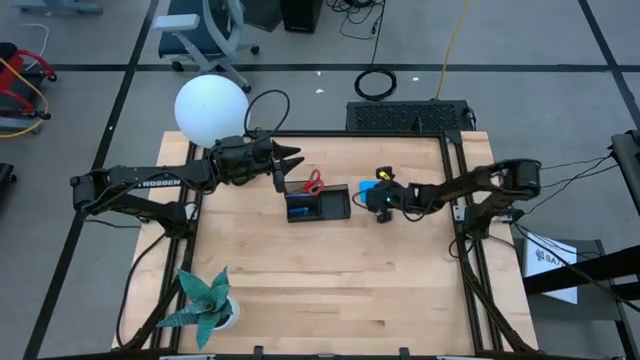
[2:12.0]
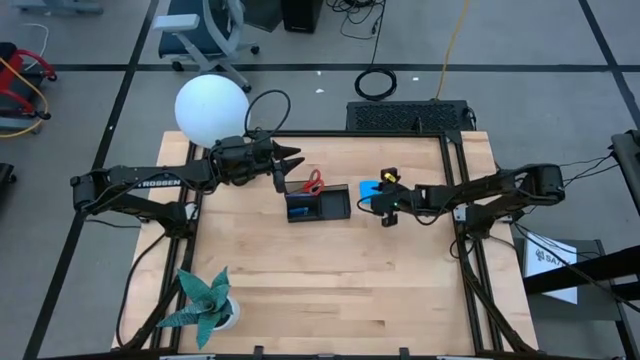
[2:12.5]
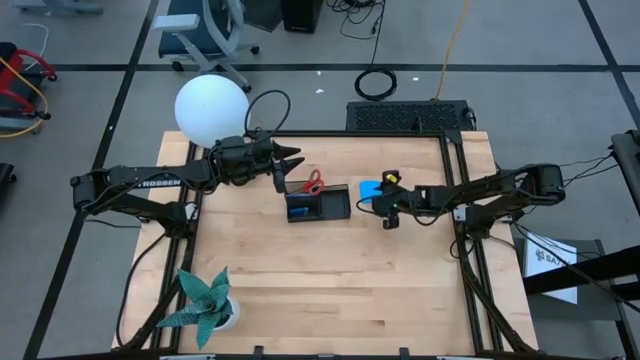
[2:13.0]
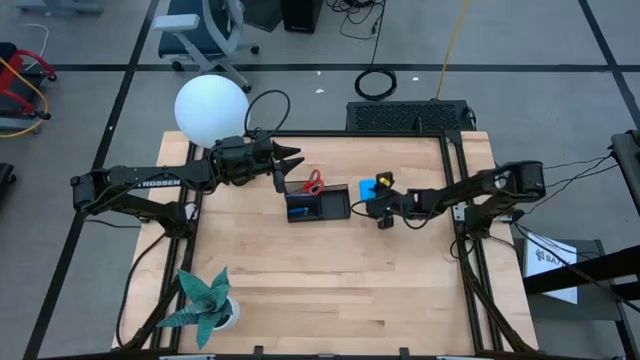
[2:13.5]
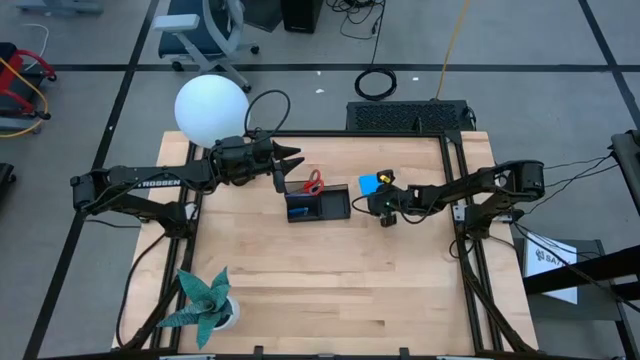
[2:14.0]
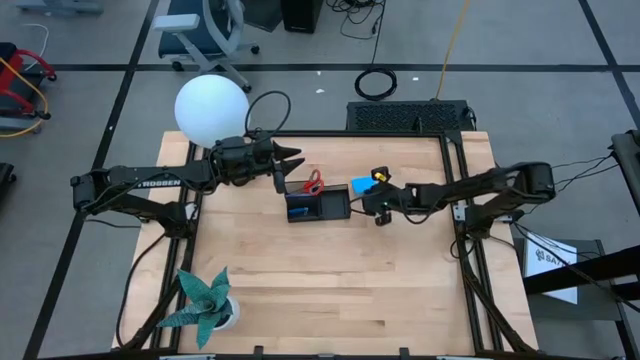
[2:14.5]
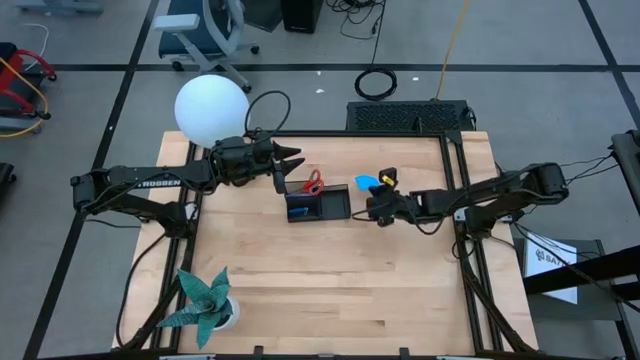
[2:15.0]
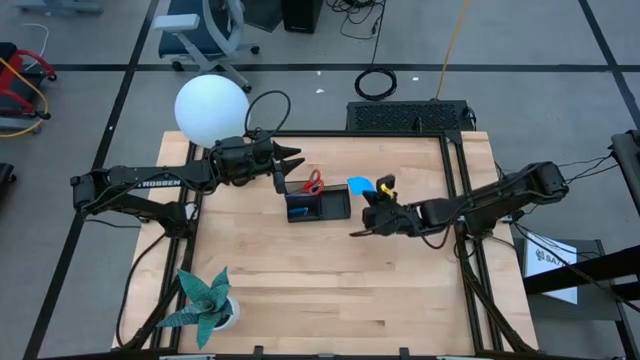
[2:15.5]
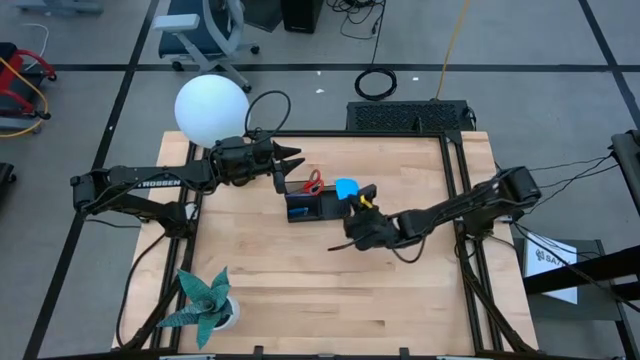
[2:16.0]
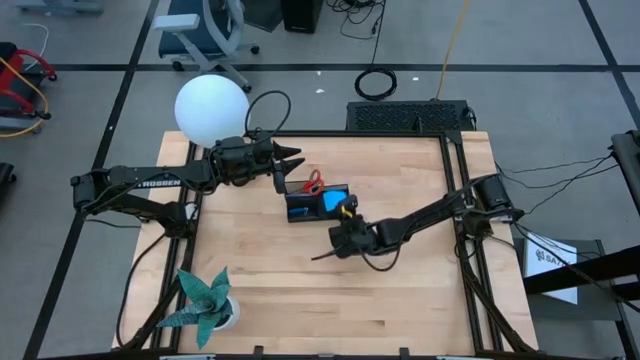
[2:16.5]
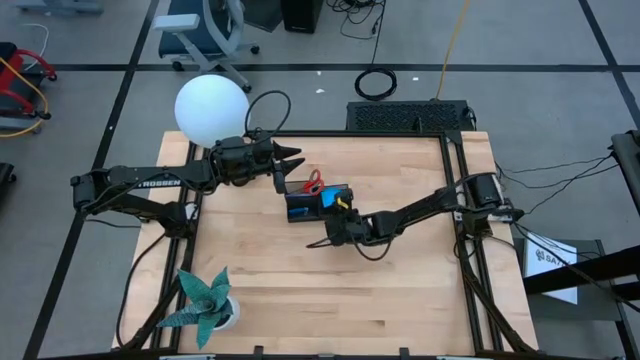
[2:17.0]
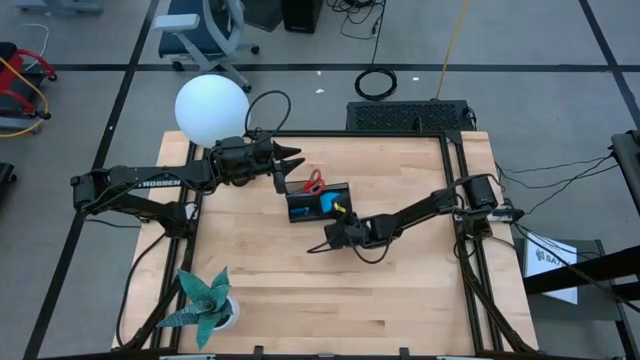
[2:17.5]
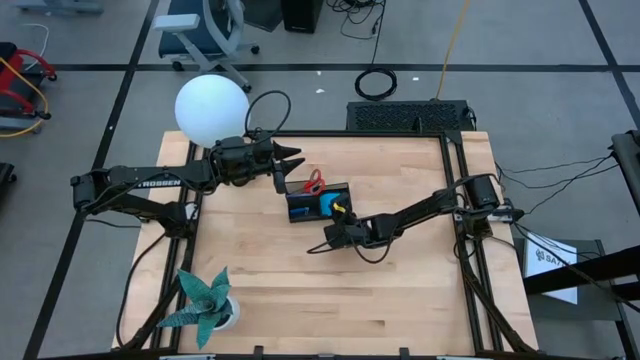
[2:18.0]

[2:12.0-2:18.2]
Task: Pick and place office supplies into organizer
Put the blue sticky notes into the black desk organizer

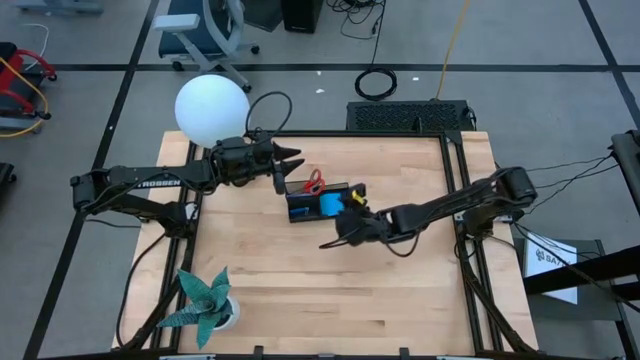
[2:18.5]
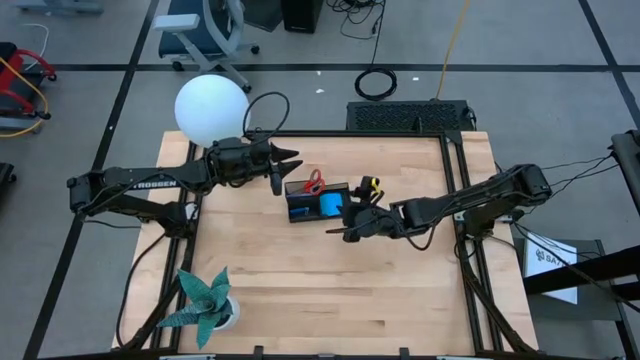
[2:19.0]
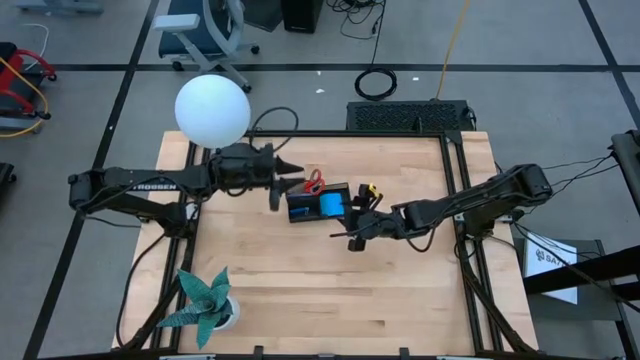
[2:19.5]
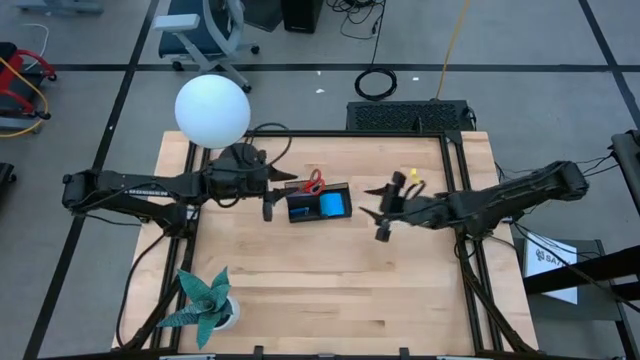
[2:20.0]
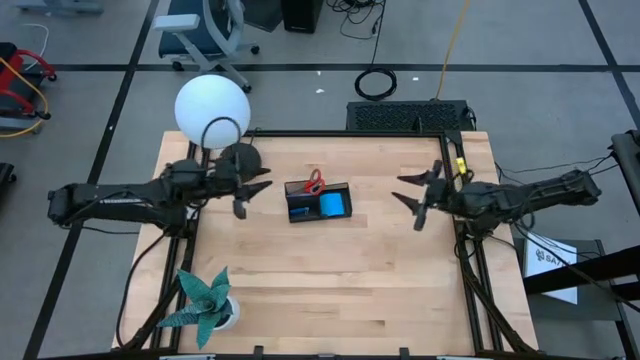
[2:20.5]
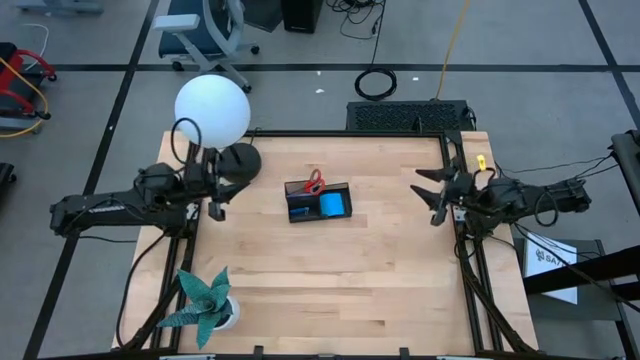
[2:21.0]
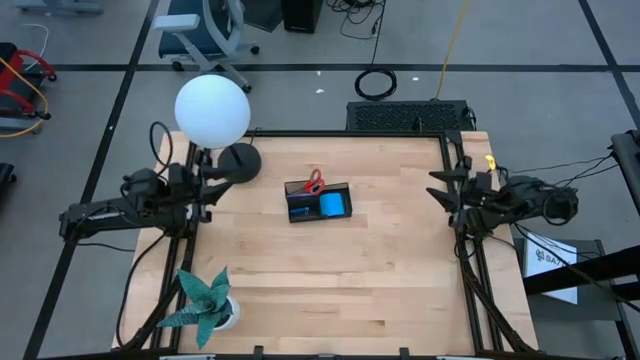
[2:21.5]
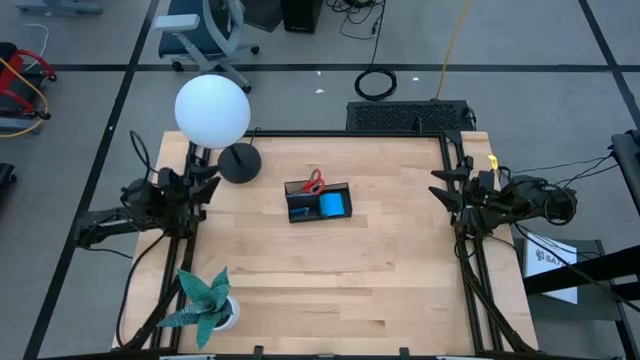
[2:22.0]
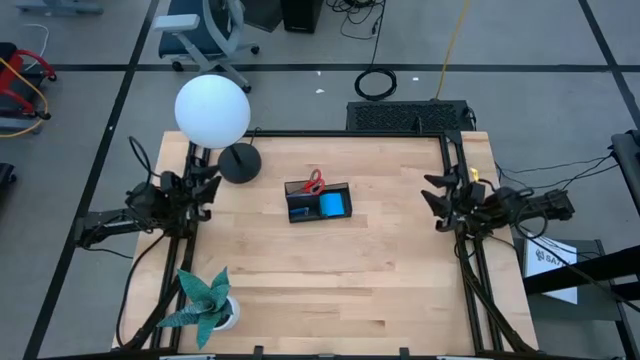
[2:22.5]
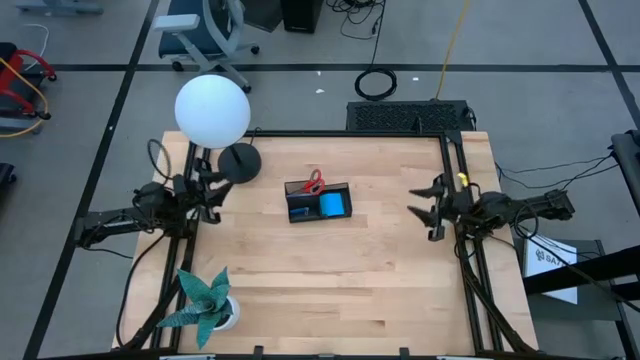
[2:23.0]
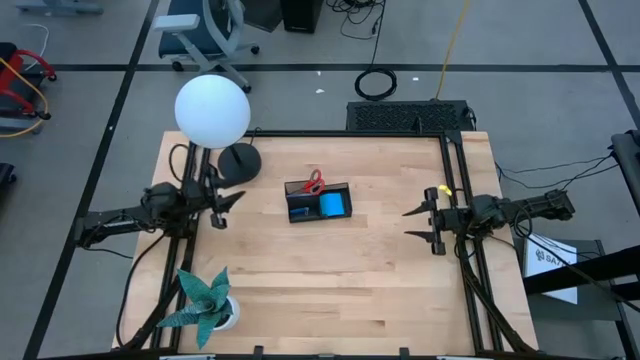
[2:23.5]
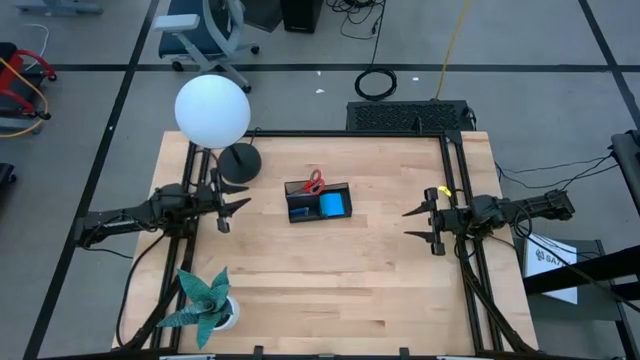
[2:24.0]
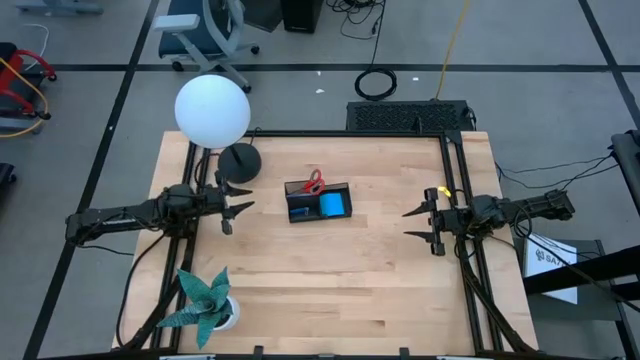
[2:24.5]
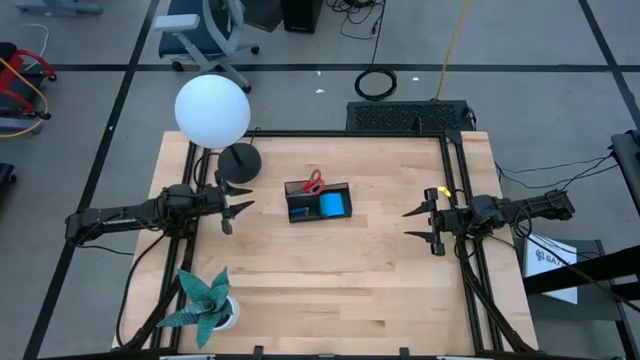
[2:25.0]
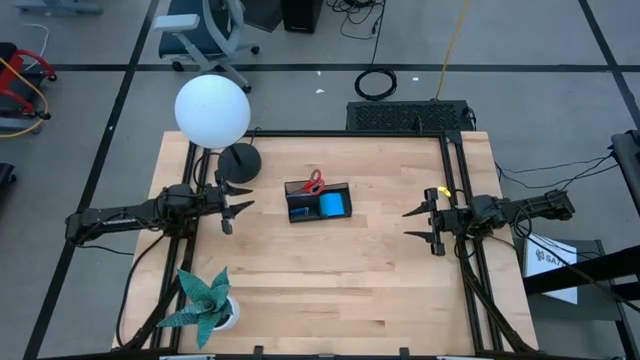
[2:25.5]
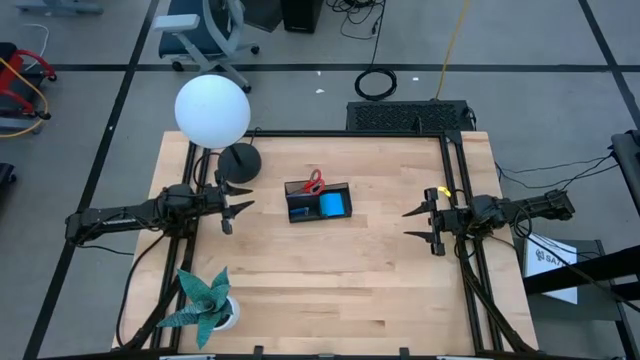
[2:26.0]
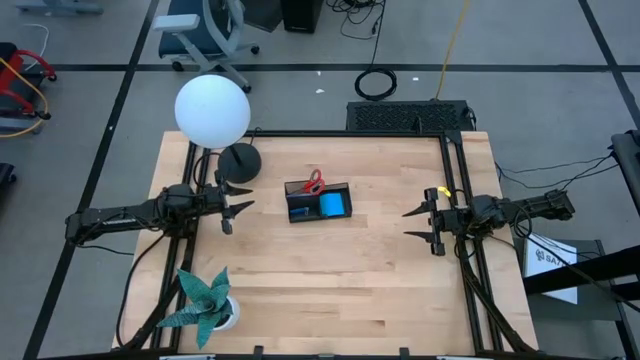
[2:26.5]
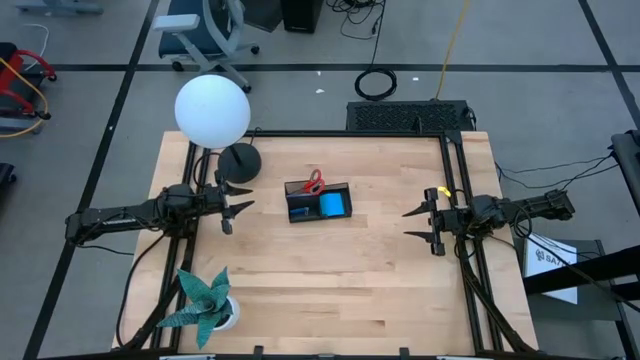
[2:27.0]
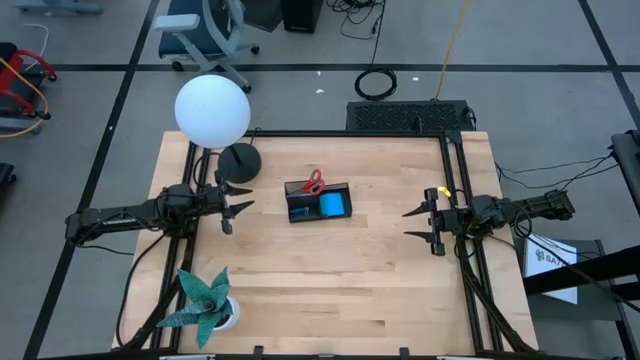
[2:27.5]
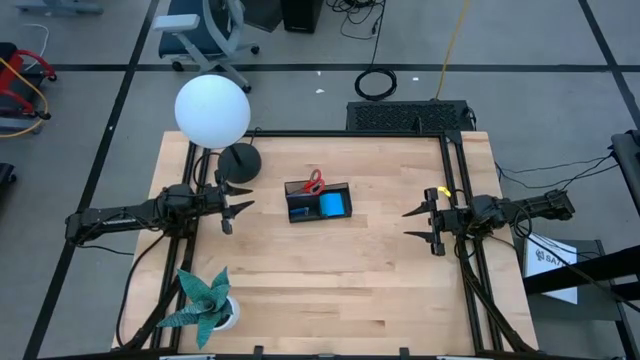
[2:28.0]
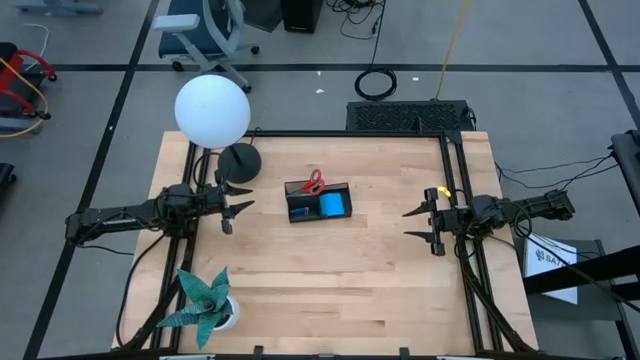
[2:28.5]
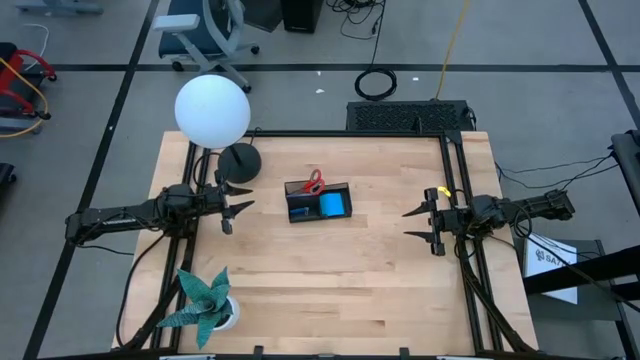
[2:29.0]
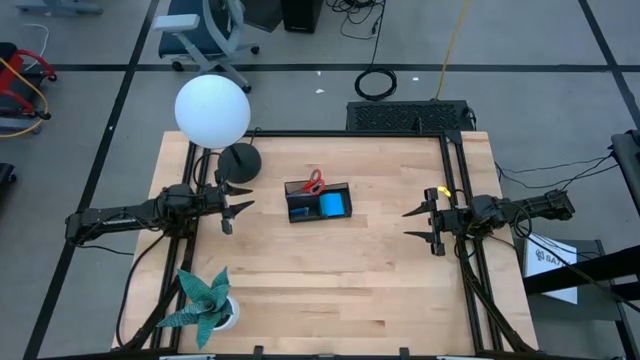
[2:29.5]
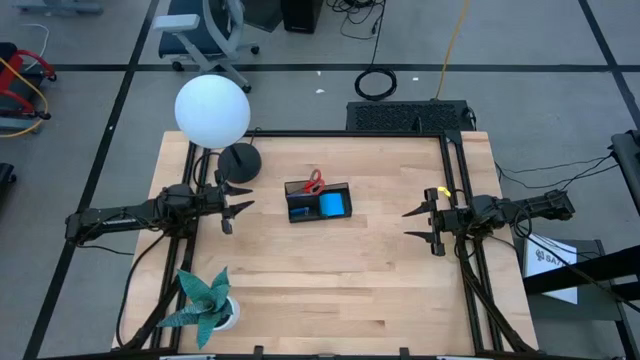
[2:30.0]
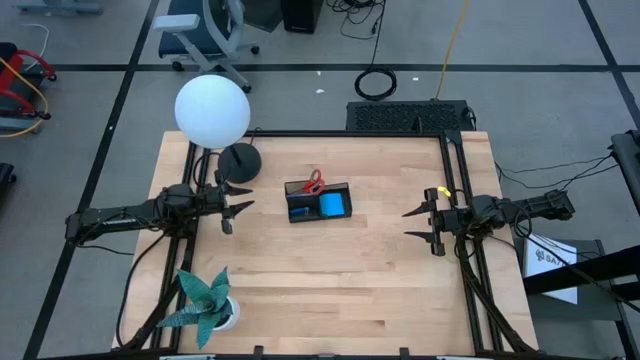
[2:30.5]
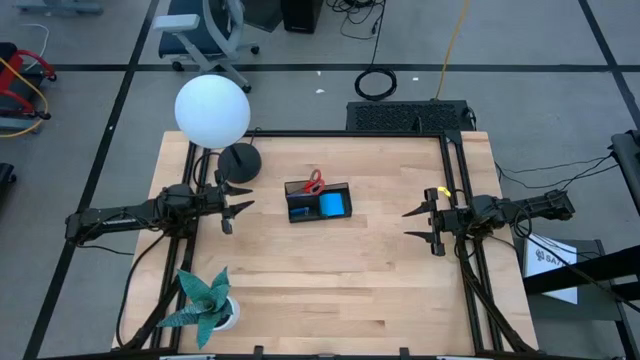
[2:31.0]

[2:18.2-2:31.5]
Return to Home Position

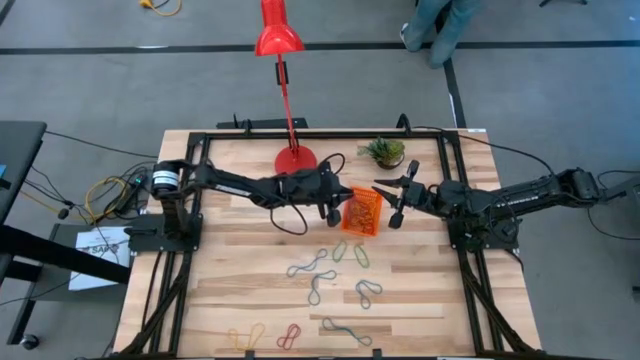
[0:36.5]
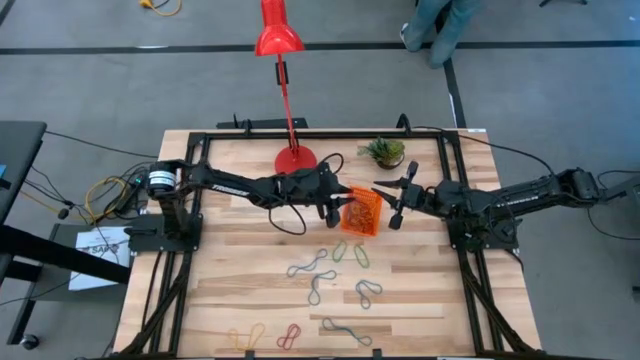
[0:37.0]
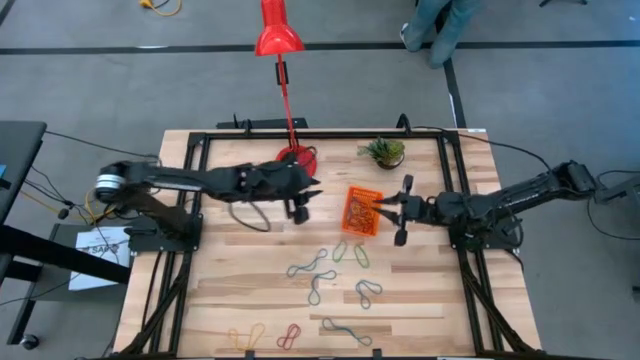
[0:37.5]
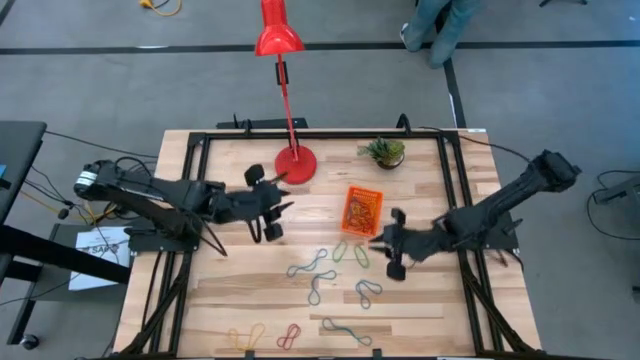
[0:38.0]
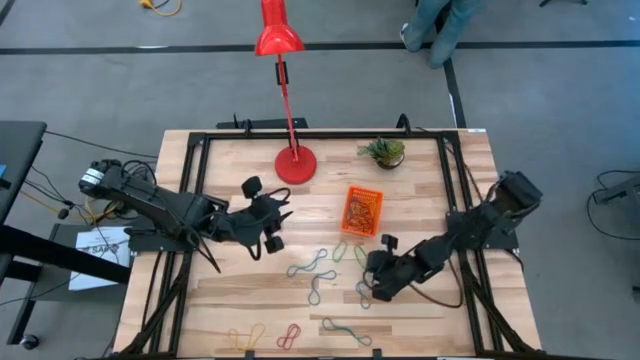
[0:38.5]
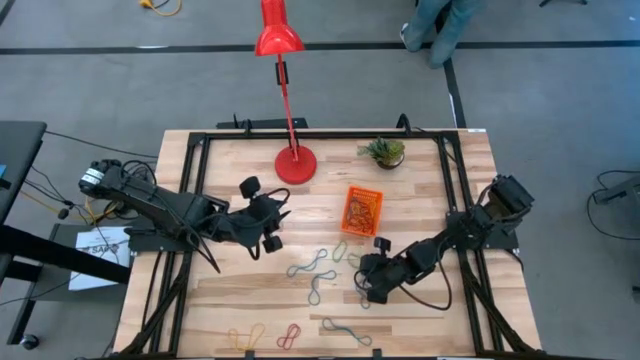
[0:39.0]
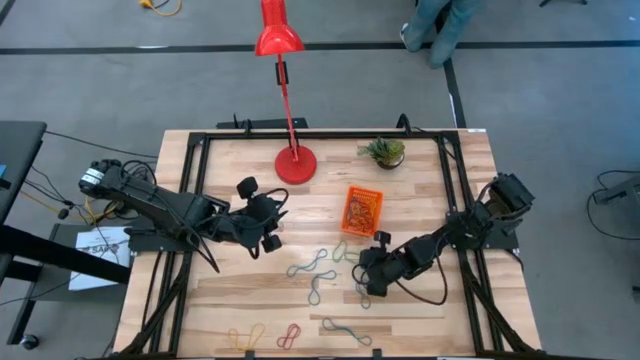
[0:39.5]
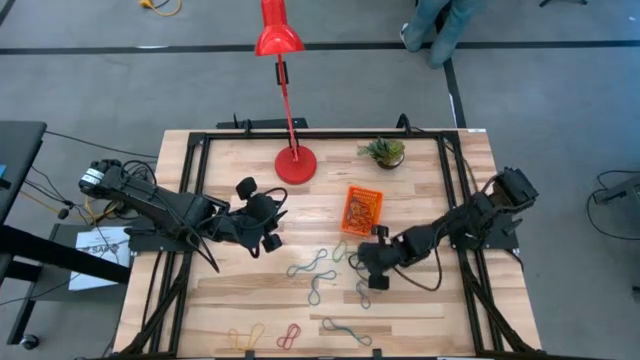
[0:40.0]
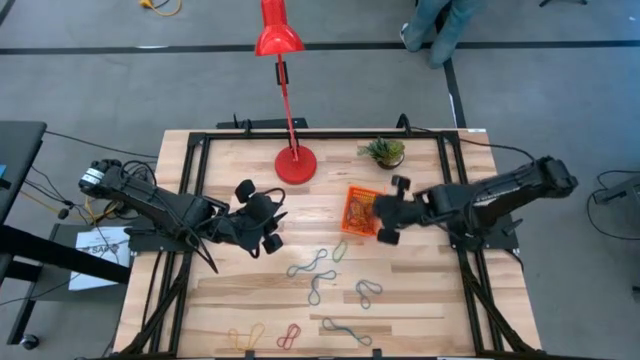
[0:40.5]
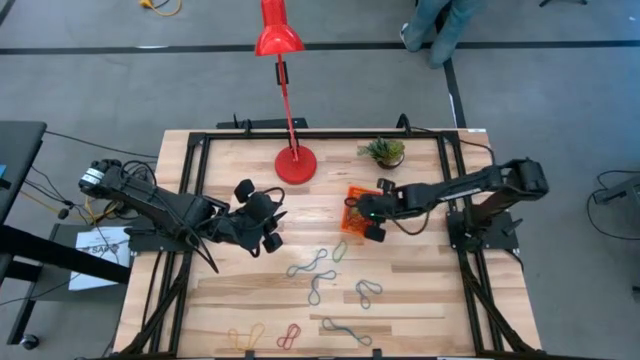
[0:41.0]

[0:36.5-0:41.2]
Task: Pick and place items into bin
Put the right green rubberband into the orange basket
